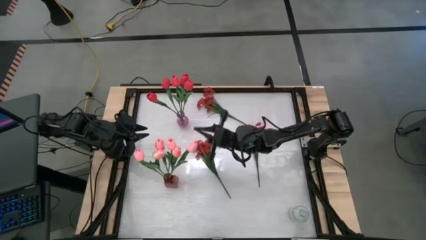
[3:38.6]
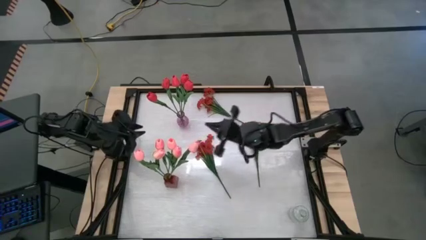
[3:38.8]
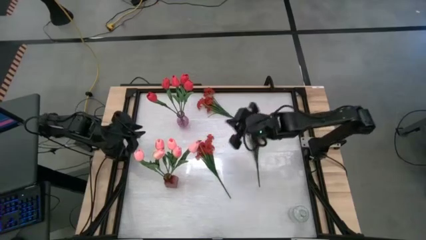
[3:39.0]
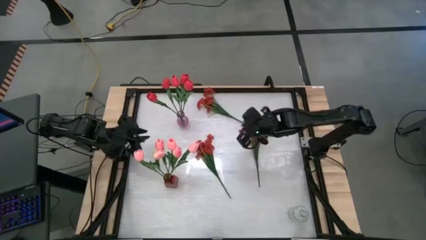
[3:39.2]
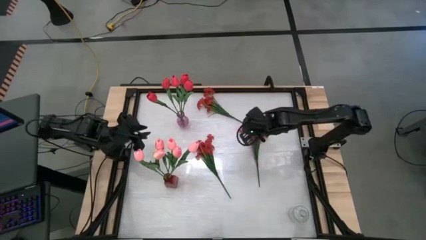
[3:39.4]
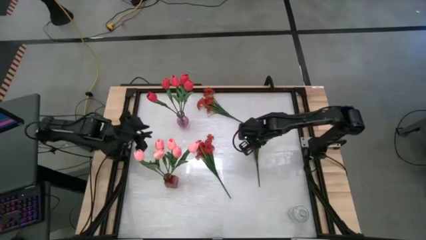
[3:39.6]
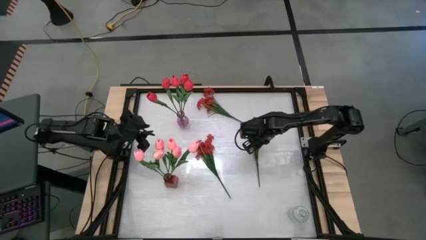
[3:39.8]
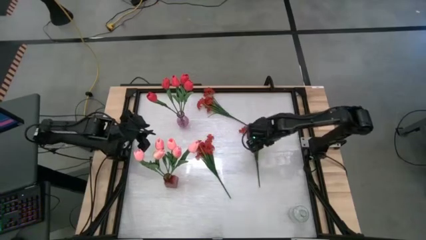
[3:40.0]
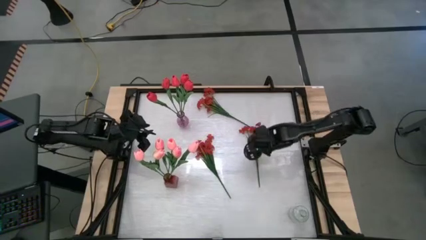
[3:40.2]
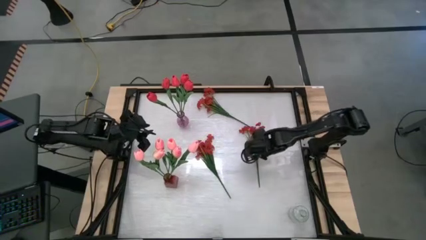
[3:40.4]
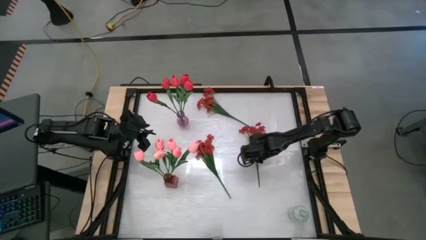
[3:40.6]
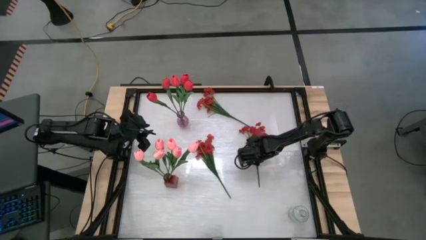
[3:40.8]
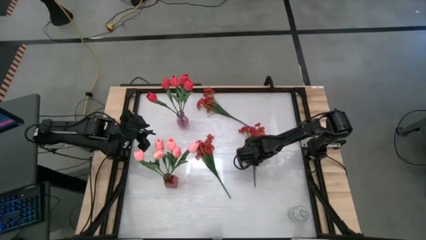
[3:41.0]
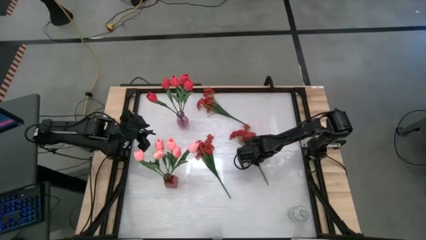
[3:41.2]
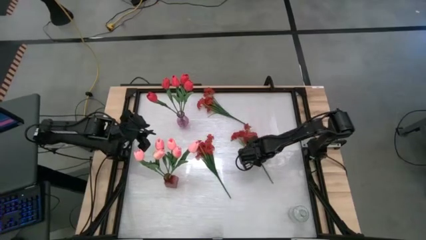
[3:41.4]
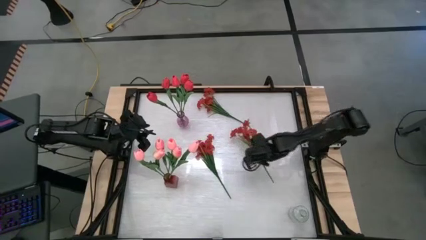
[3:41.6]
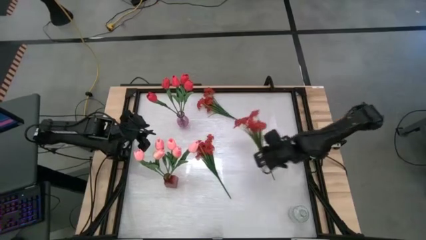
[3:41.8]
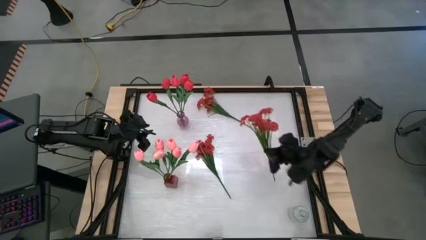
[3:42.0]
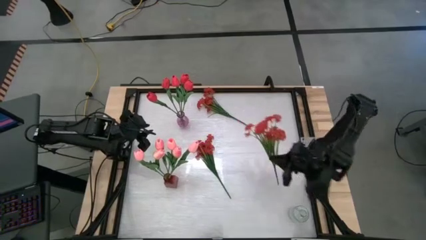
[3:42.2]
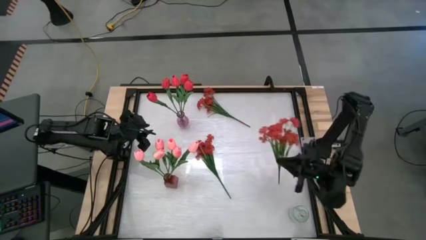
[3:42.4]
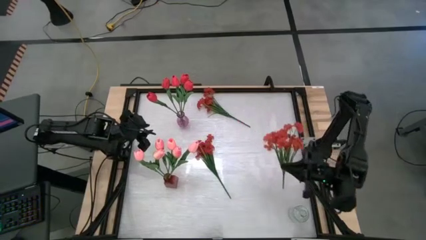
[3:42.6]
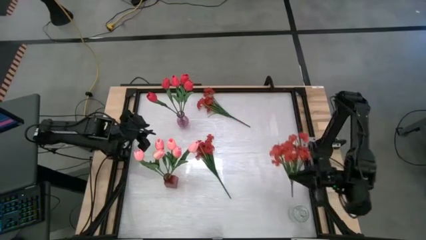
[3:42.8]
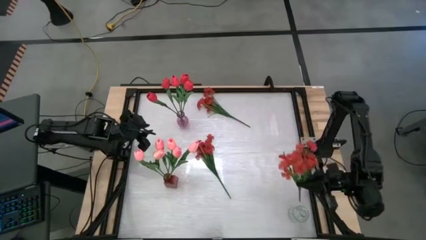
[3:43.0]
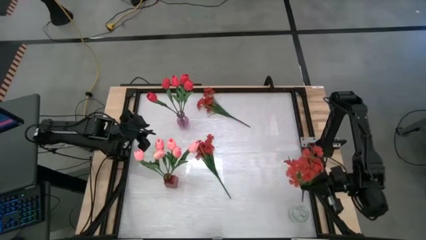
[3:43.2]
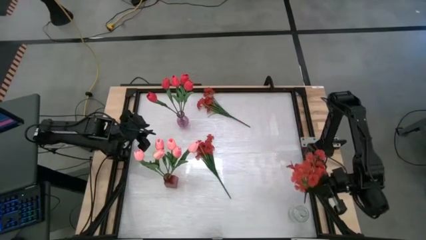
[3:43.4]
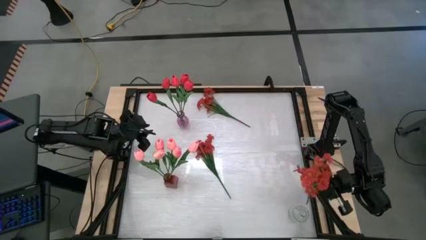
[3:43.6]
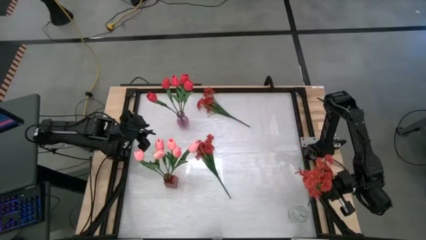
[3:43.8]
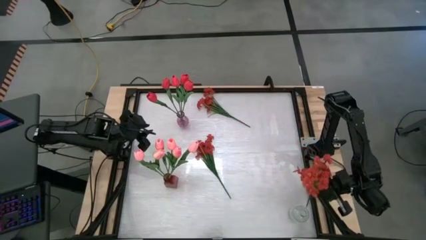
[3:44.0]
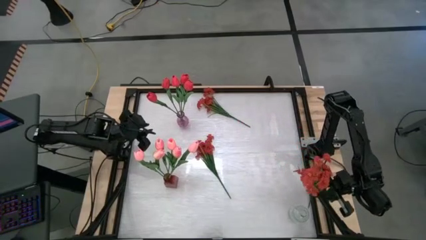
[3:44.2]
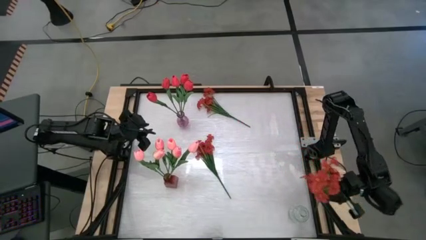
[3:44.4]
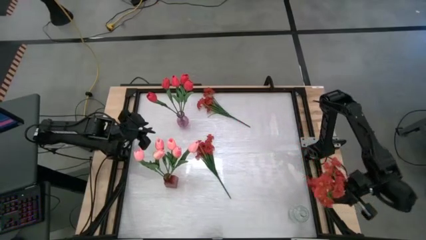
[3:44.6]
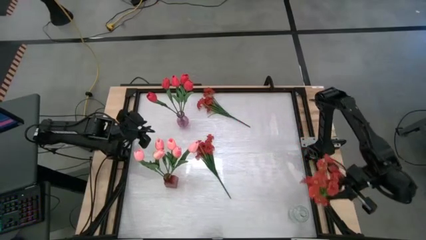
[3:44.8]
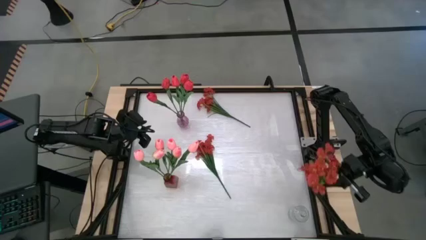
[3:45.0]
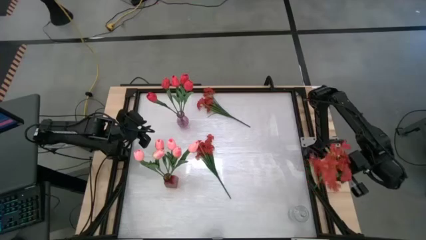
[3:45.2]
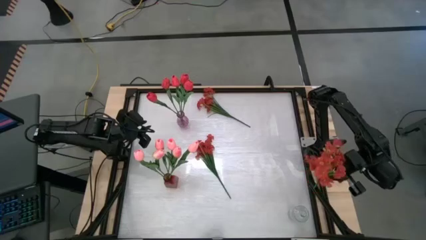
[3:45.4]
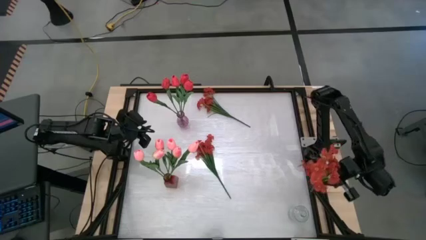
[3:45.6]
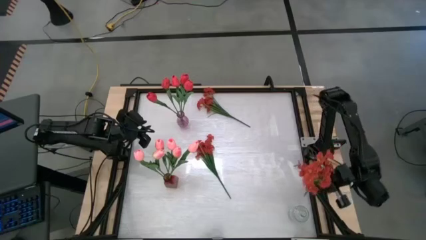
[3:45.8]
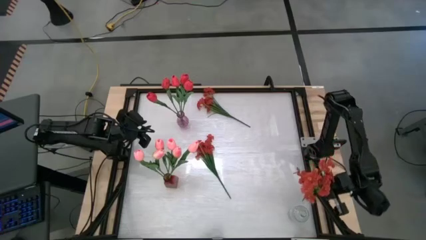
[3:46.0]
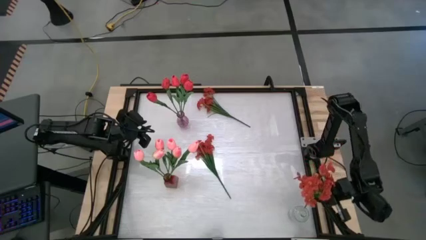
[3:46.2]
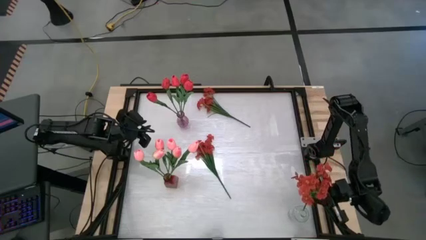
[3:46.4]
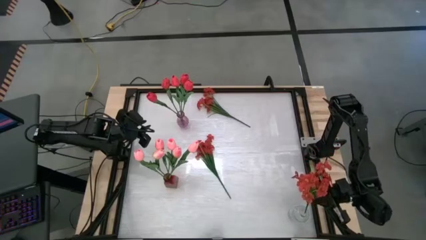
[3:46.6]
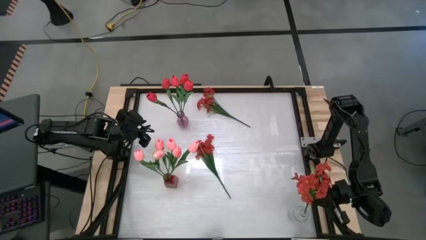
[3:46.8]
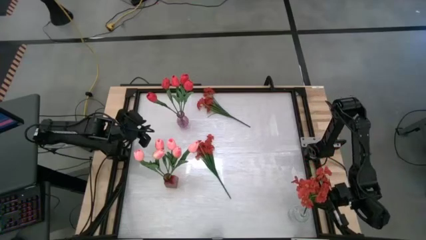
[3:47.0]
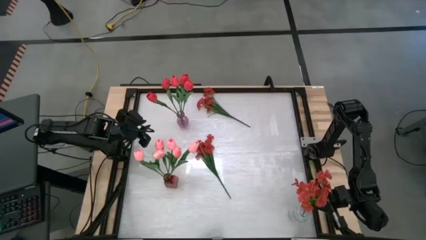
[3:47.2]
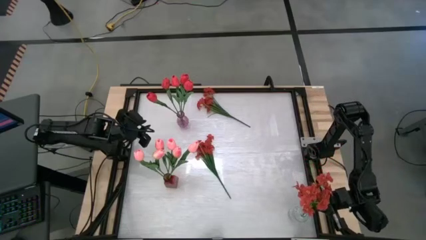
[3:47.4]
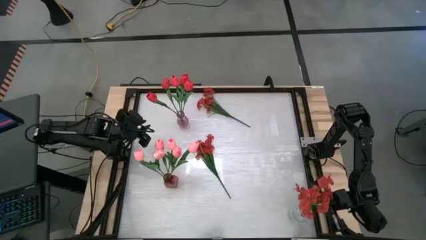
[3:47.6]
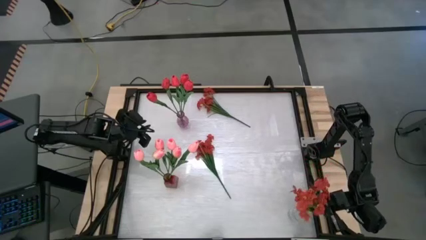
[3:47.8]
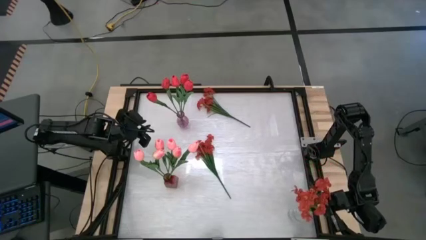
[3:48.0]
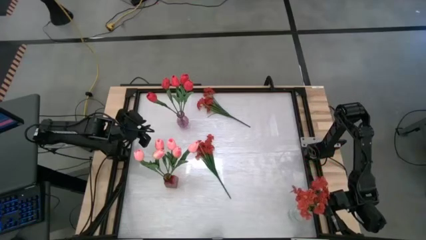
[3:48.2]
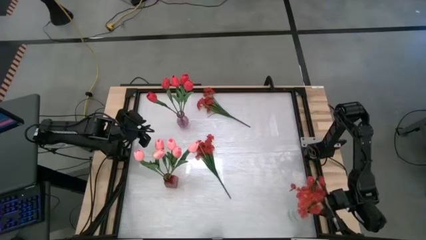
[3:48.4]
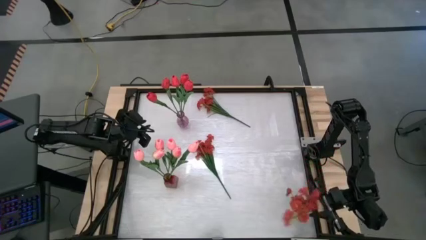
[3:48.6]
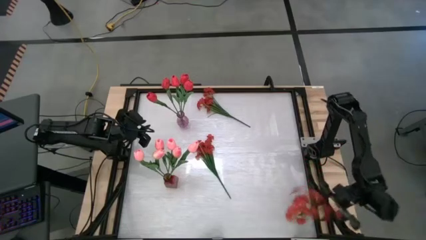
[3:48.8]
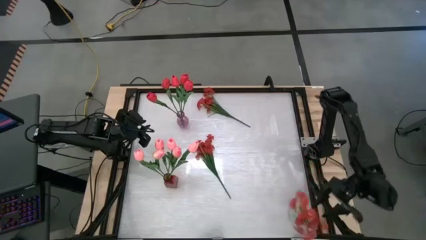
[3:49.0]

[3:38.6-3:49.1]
Task: Sort flowers into vase by color
Put the red flowers into the transparent vase

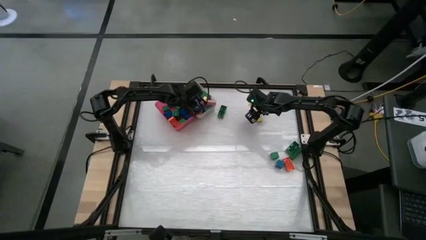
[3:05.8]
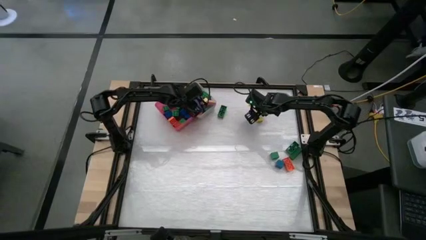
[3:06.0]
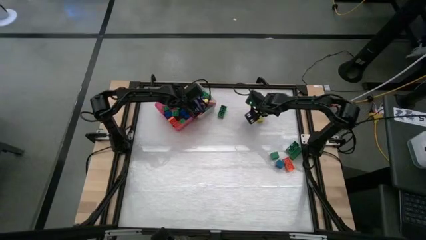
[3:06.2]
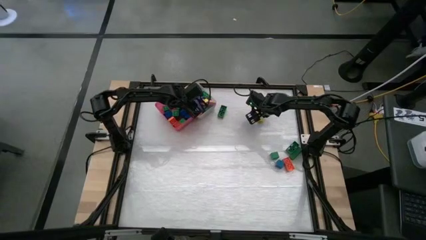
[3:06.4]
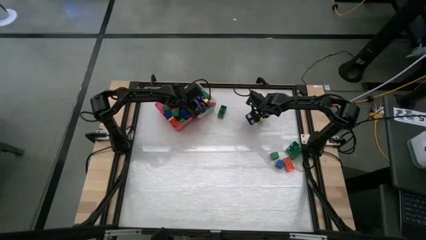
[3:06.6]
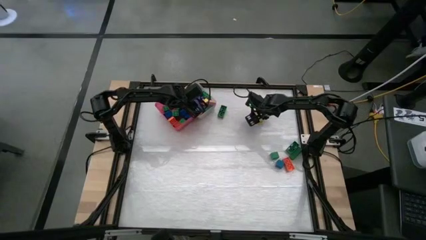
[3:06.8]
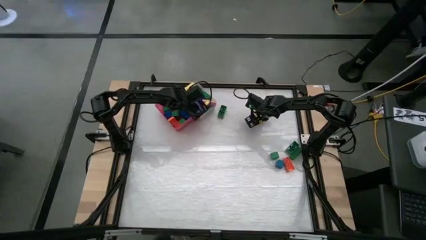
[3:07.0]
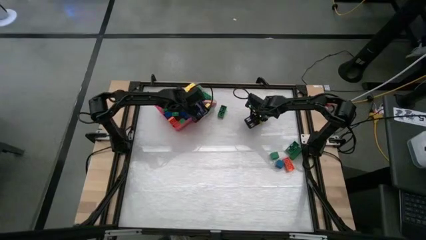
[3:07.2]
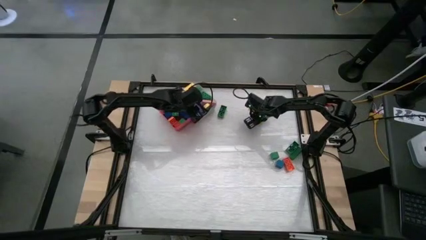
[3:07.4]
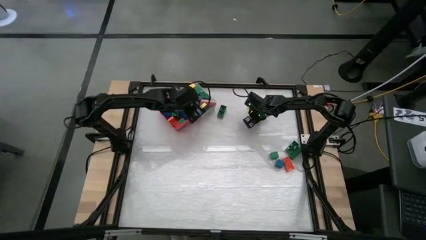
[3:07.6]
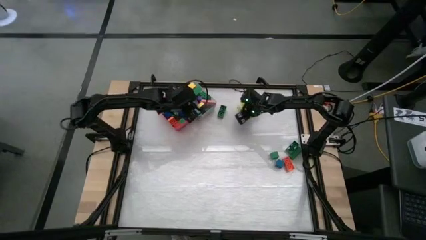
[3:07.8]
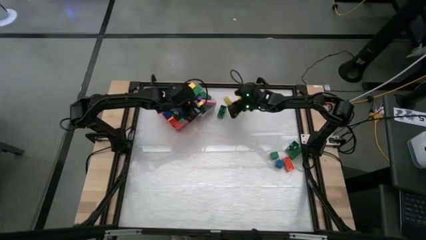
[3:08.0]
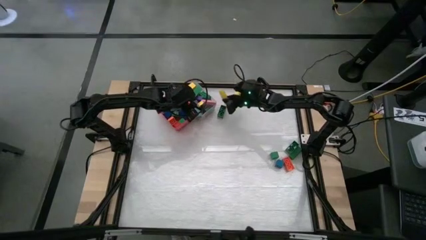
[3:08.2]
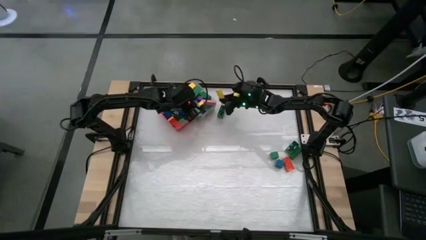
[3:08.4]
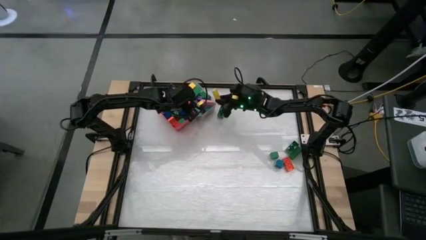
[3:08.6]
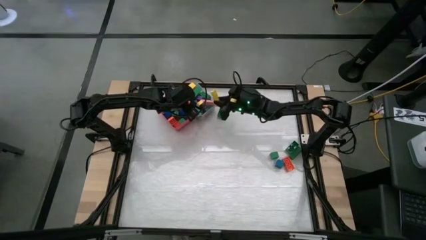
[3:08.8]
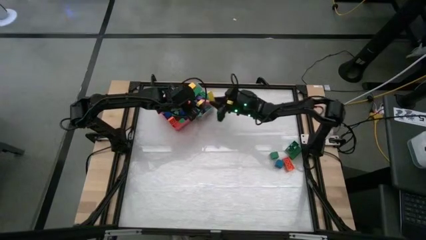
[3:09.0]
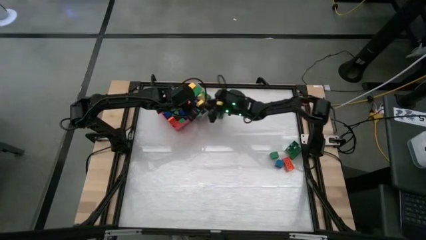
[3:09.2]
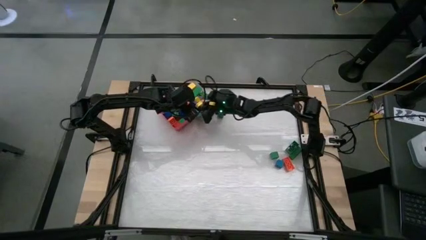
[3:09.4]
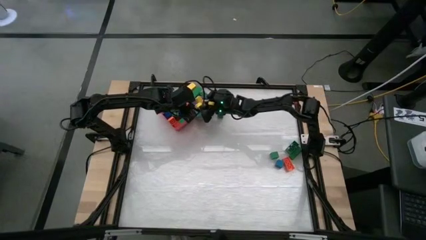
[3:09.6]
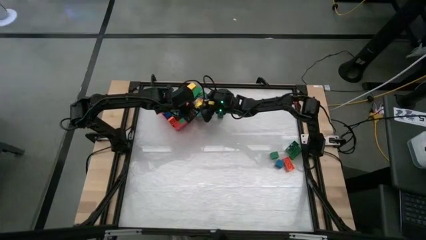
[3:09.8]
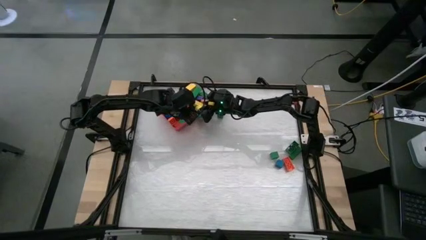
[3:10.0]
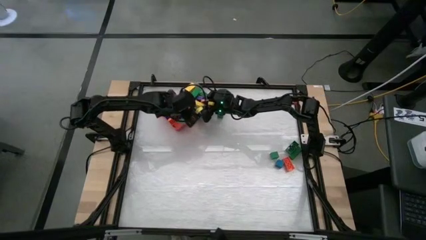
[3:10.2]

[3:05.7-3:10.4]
Task: Sort blocks by size
Put the big yellow block into the white bin
